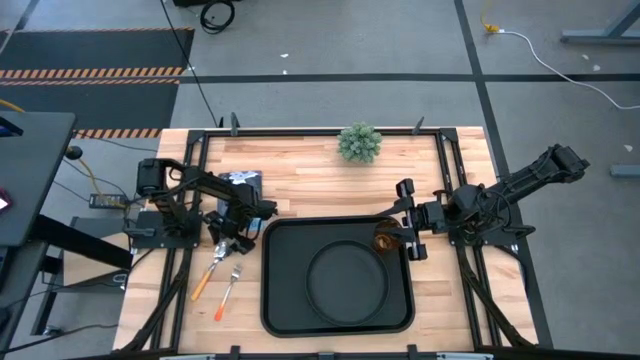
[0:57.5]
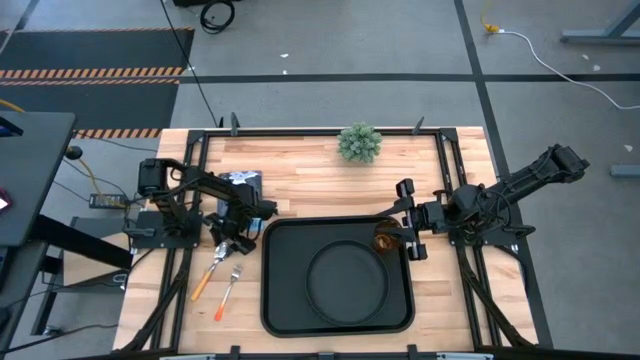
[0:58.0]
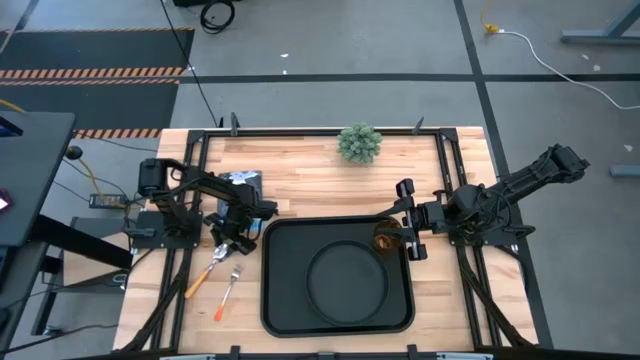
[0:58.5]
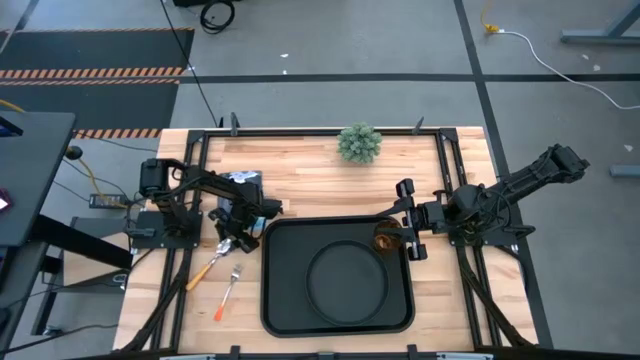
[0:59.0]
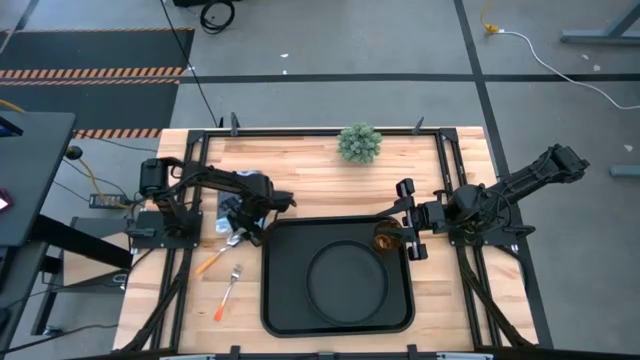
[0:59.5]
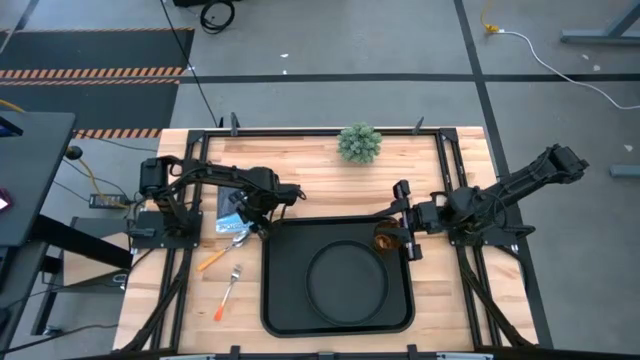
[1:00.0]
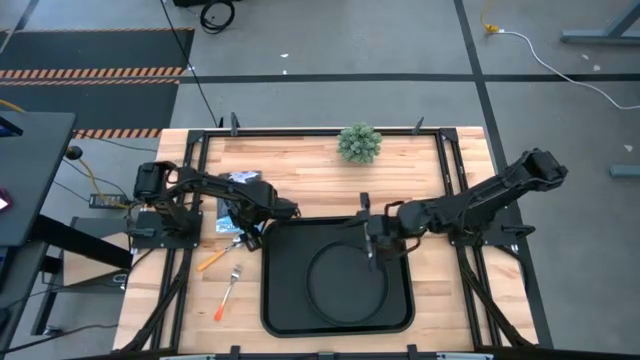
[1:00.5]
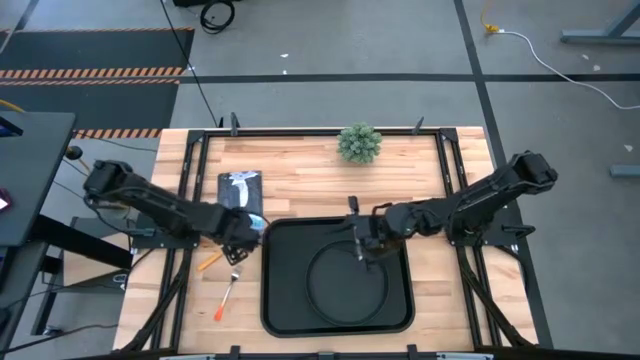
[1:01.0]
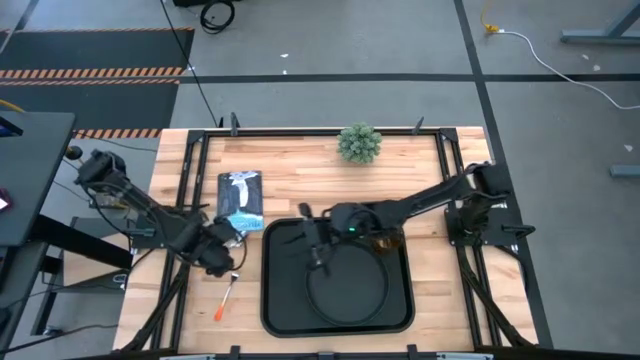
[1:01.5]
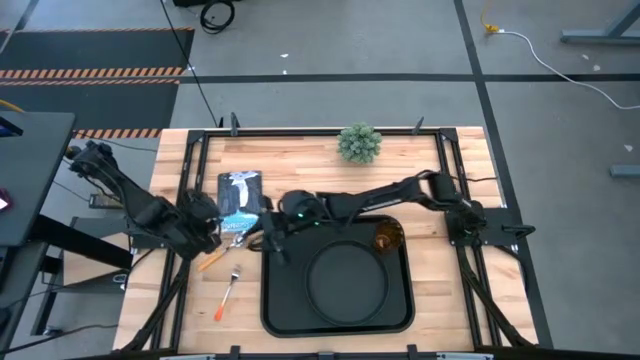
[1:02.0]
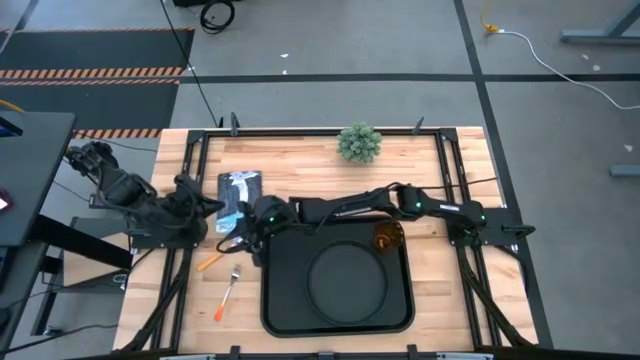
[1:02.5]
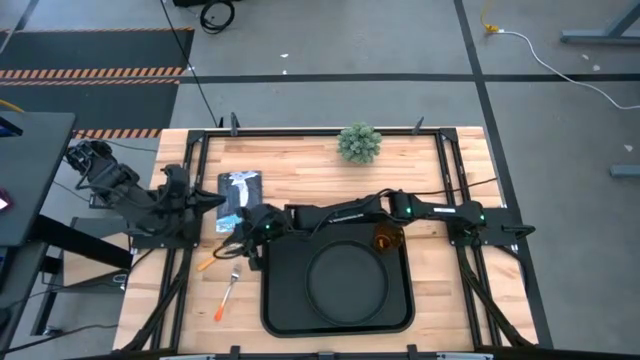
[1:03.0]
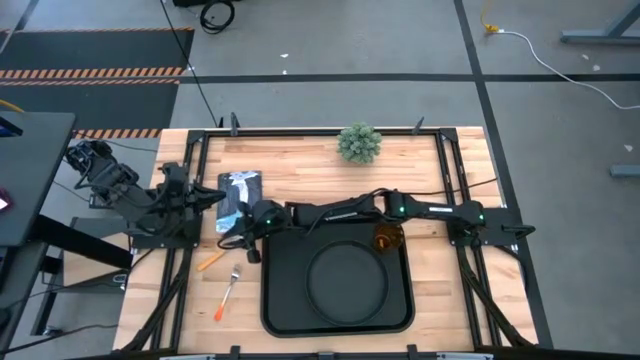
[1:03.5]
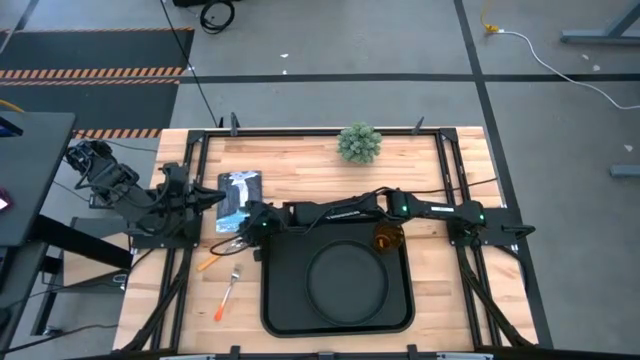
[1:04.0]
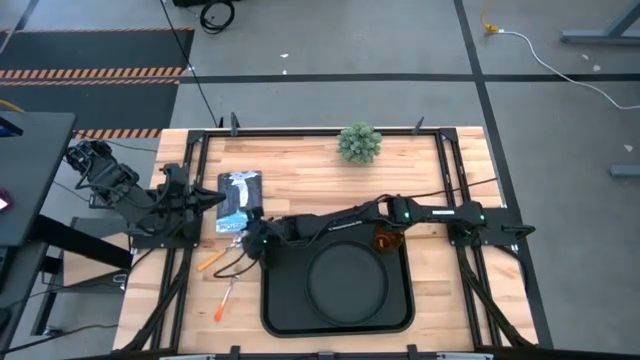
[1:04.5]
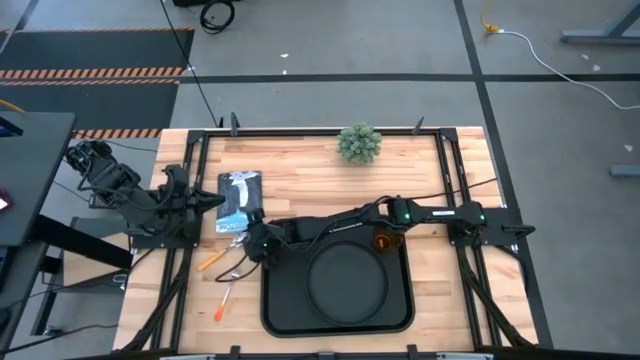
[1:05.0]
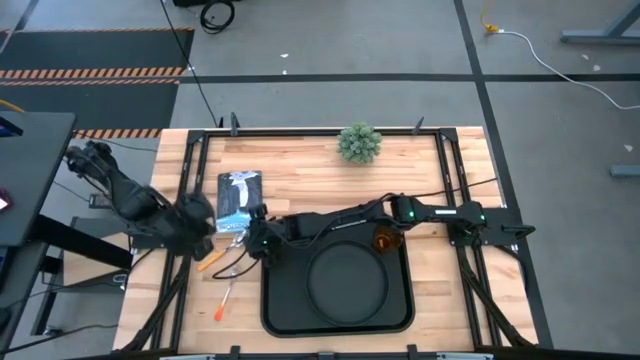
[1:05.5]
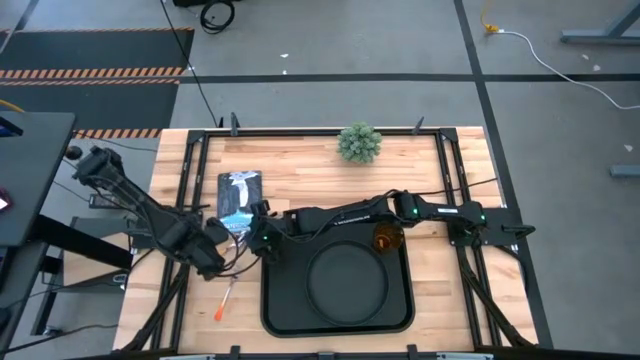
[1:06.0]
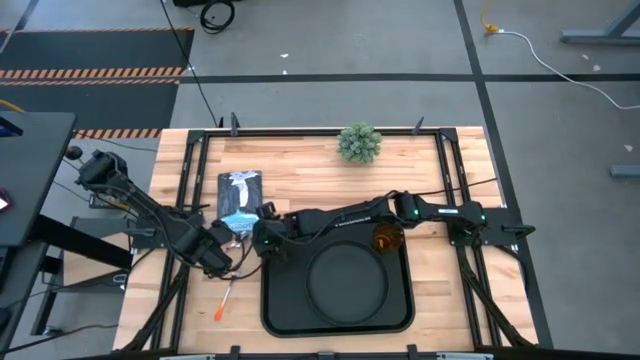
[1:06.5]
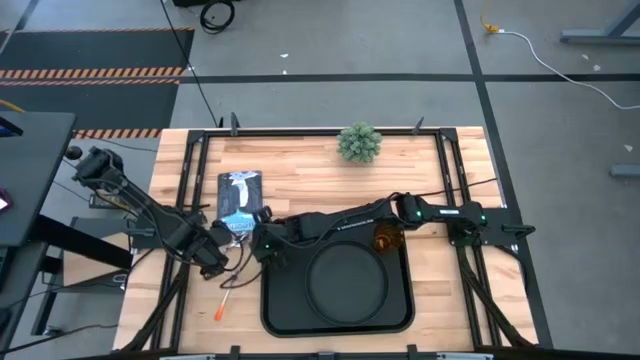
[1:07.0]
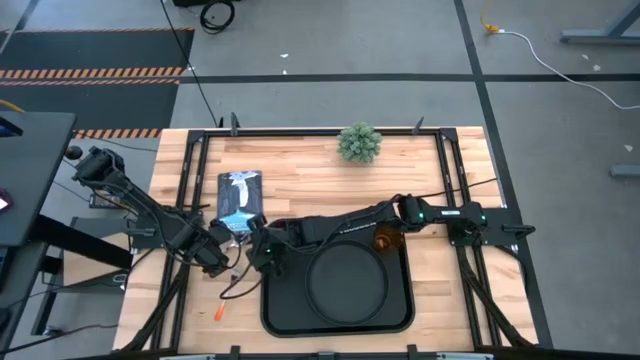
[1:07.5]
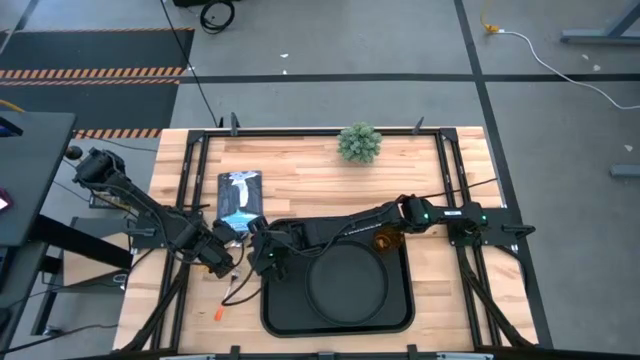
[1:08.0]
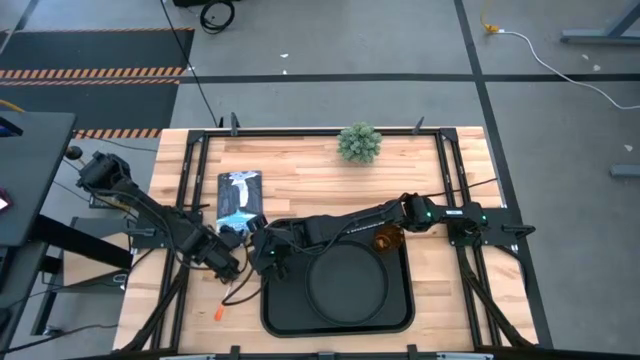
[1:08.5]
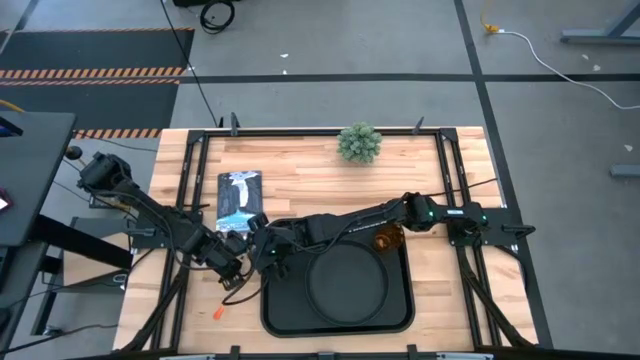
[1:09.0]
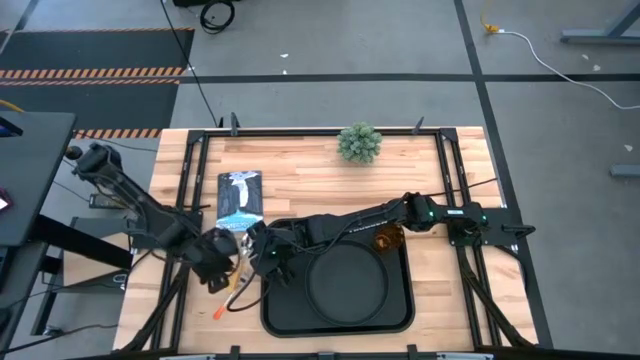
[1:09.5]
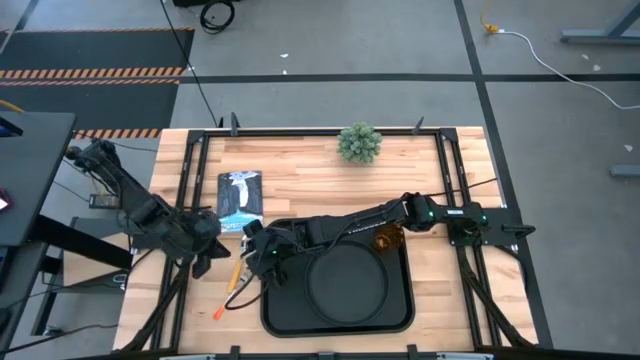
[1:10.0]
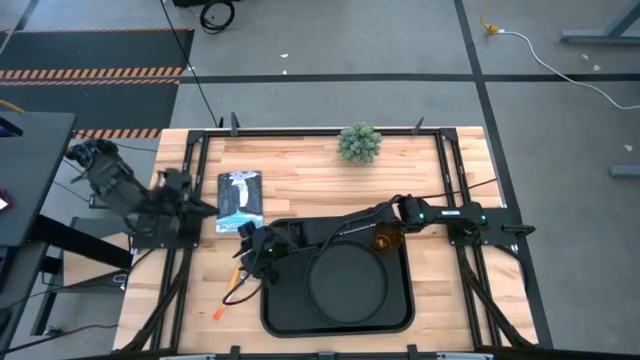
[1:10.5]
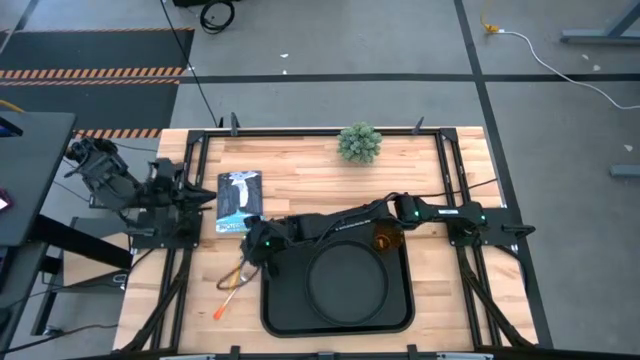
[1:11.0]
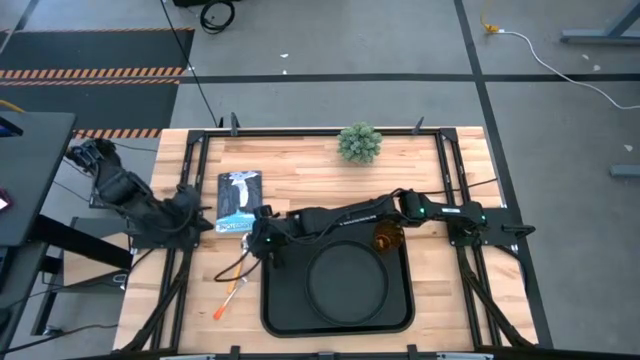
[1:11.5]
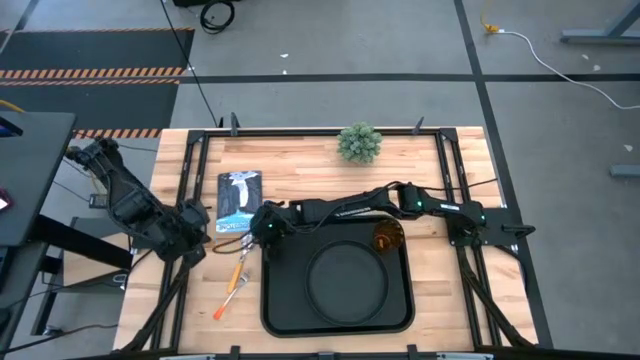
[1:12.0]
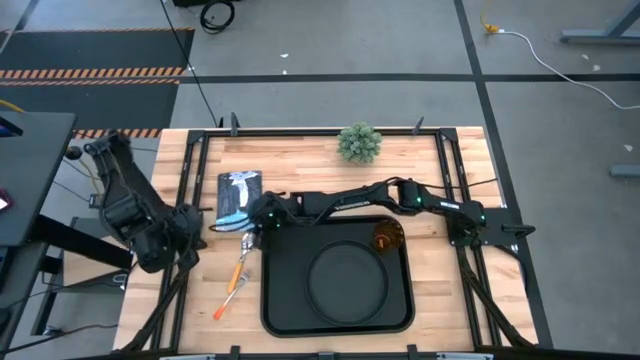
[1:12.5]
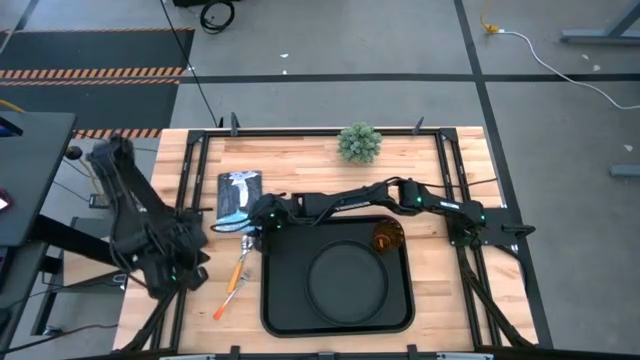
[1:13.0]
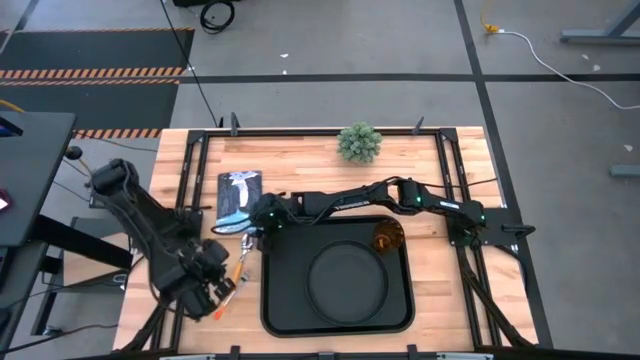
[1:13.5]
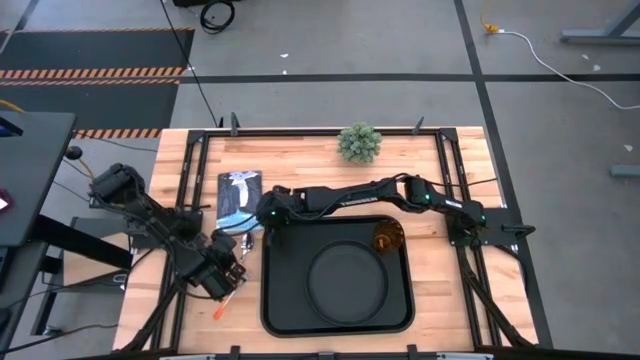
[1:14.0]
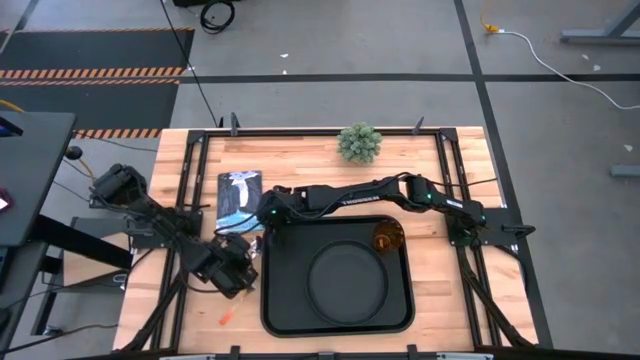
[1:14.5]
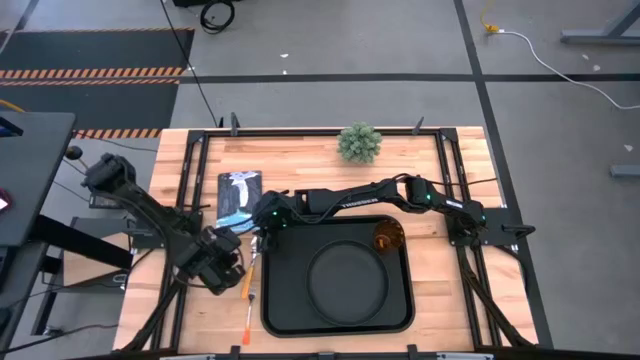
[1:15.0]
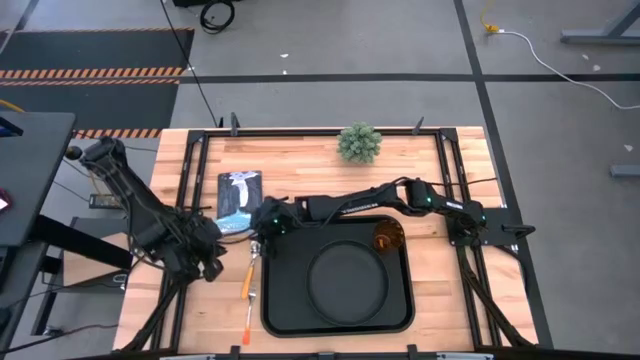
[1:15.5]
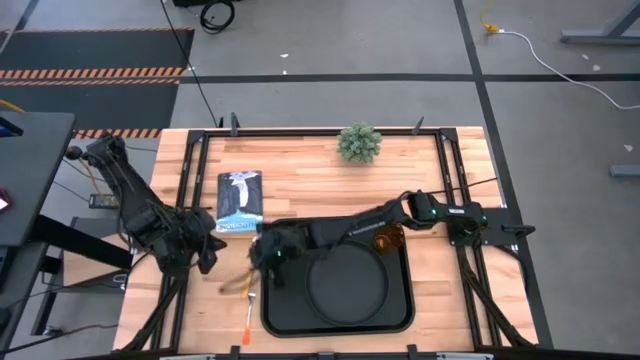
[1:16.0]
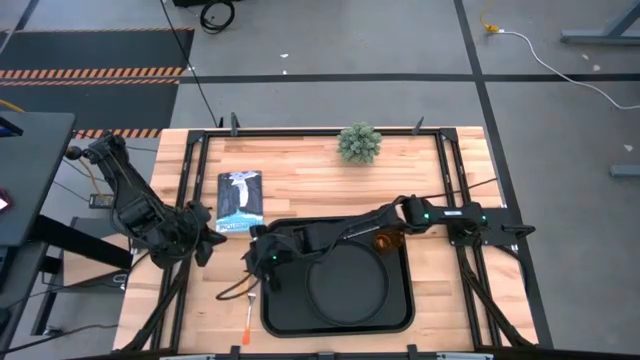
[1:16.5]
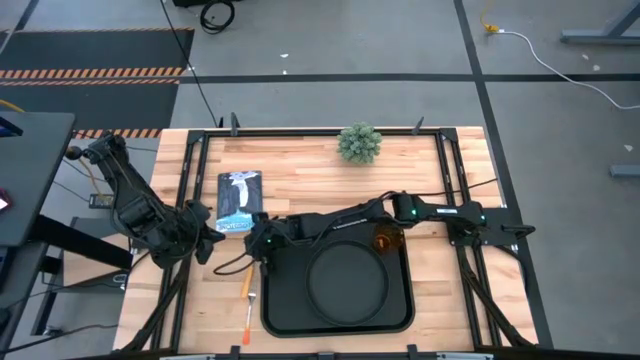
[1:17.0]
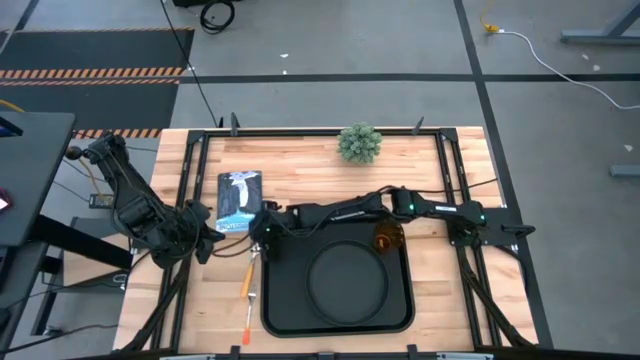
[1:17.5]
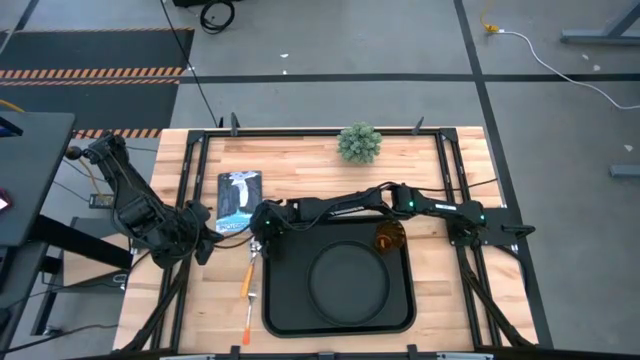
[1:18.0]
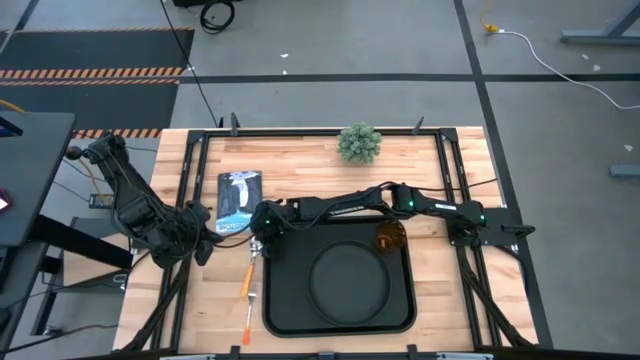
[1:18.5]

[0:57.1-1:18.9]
Task: Pick and place plate/cup/fork/spoon on tray
Put the orange spoon on the black tray
